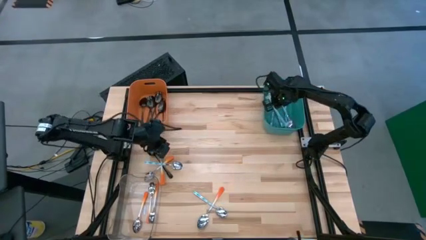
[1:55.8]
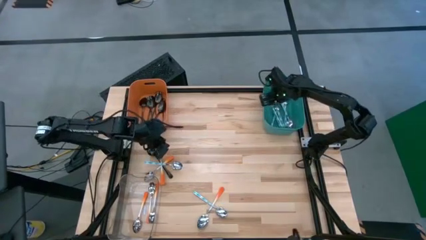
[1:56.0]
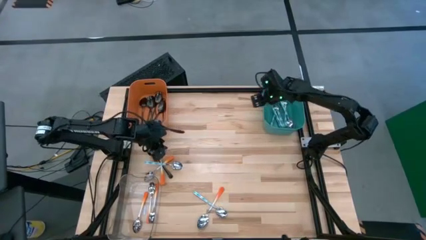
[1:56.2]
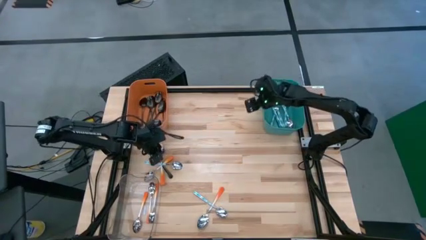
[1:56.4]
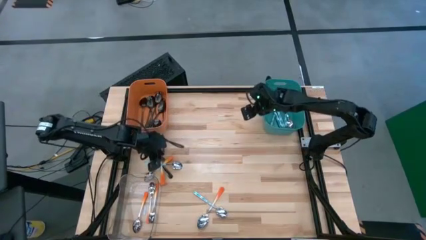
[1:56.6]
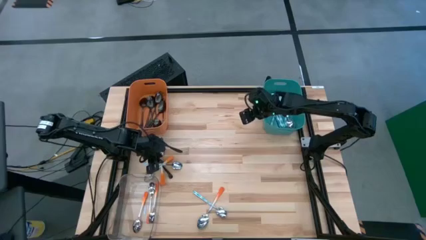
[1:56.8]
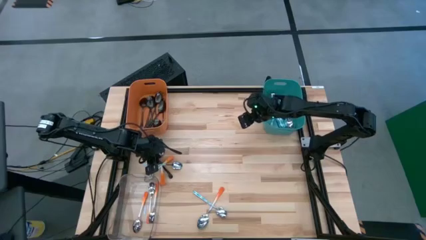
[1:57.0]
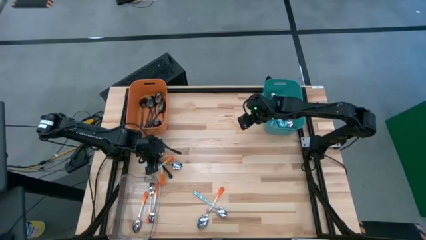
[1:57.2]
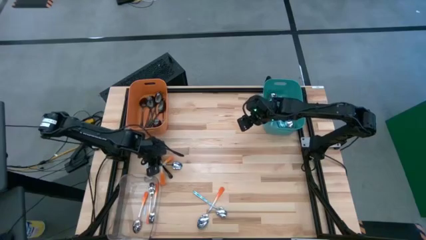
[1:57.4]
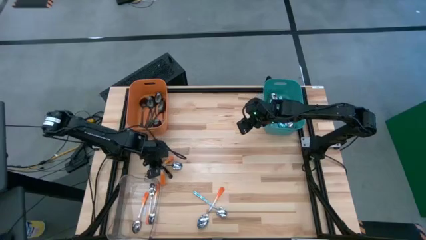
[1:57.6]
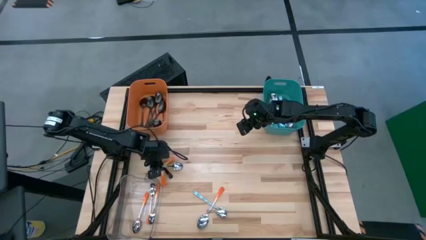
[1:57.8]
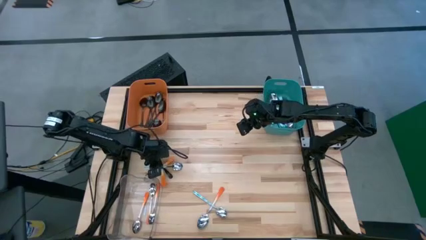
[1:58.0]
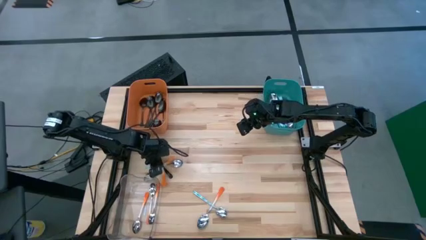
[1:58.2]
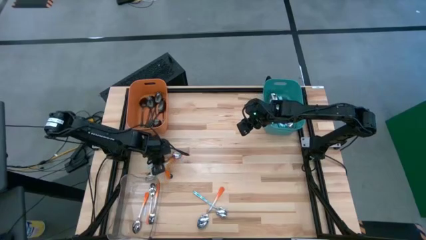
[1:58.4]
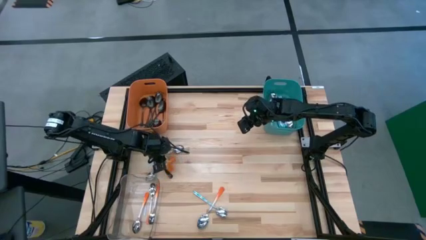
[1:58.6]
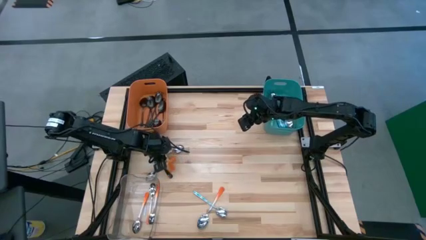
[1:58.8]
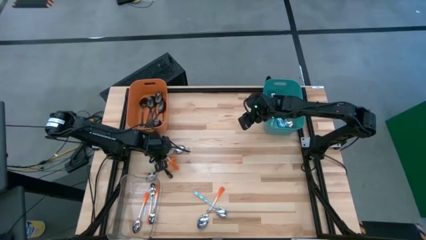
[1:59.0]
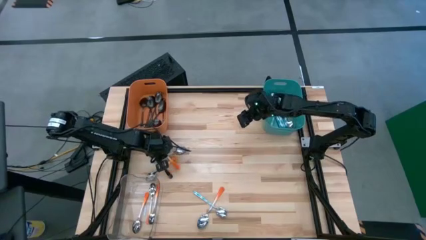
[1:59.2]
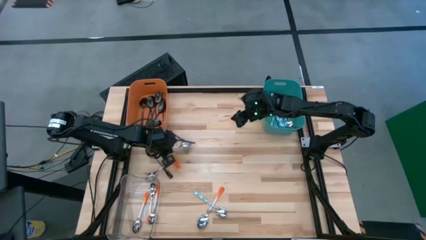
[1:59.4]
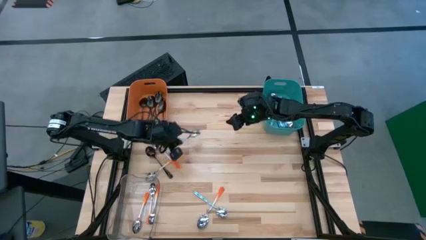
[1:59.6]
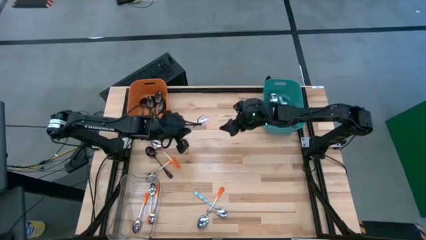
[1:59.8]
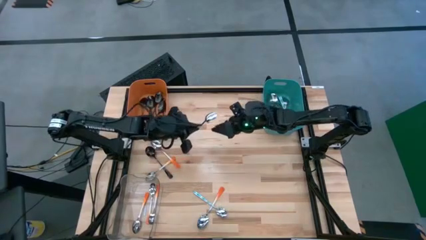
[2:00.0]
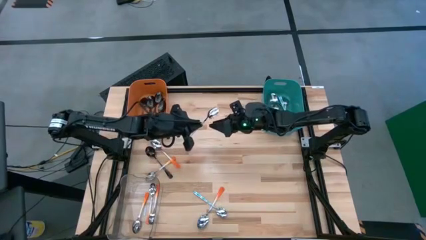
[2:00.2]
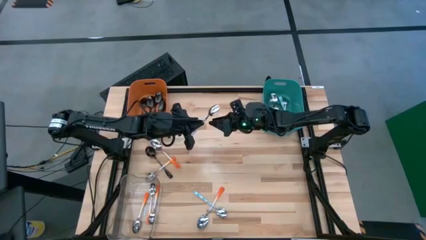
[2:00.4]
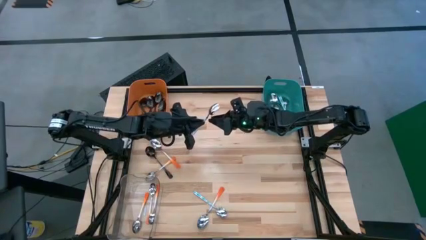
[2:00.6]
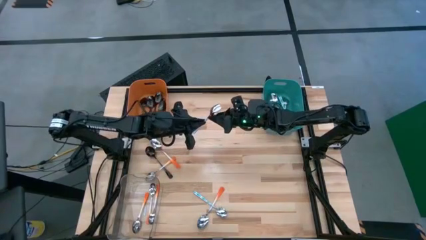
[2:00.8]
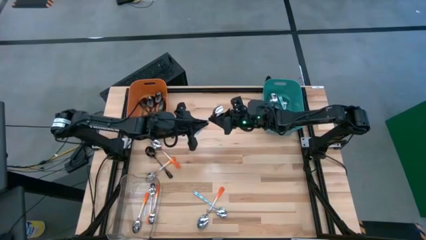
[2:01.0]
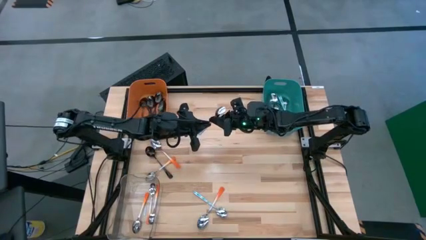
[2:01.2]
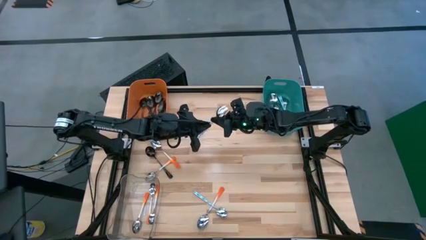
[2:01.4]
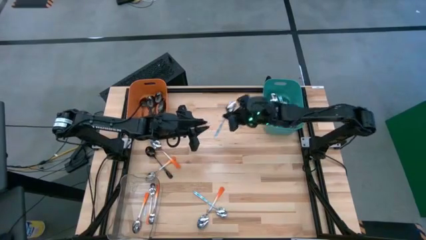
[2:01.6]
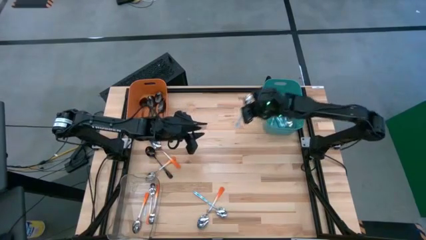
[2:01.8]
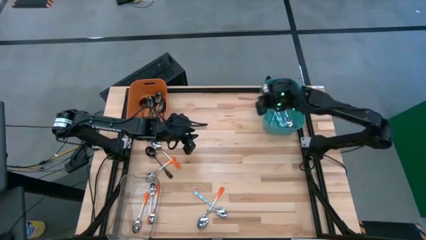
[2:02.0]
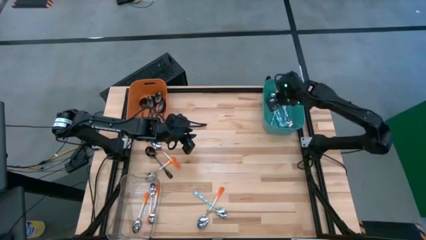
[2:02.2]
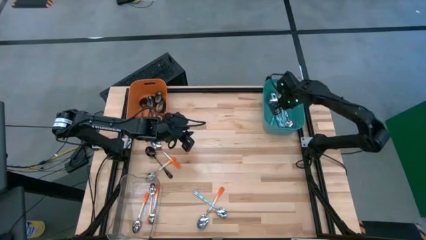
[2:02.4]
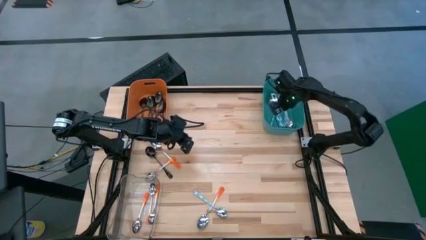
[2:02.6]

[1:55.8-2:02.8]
Task: Sort silverware by color (type)
Put the blue patterned spoon into the blue bin

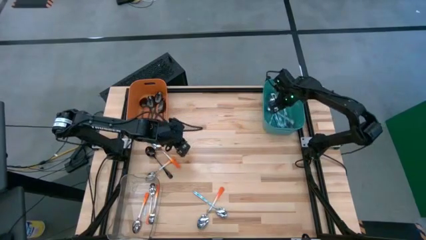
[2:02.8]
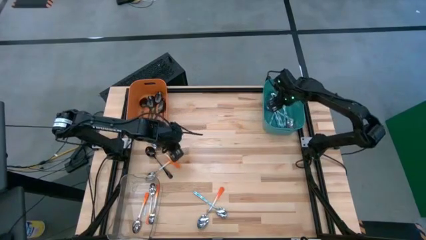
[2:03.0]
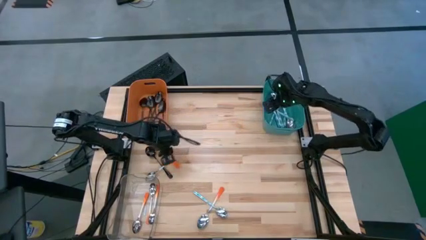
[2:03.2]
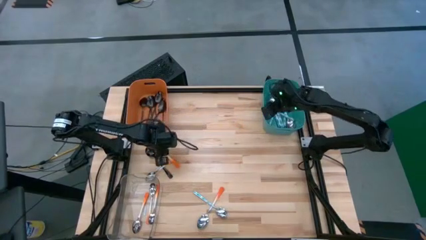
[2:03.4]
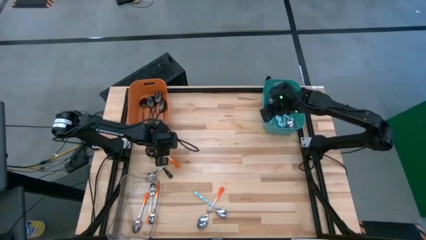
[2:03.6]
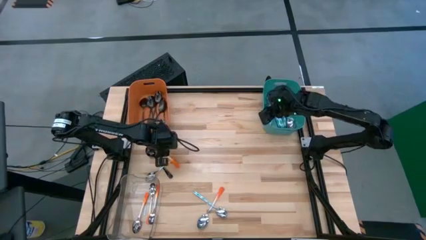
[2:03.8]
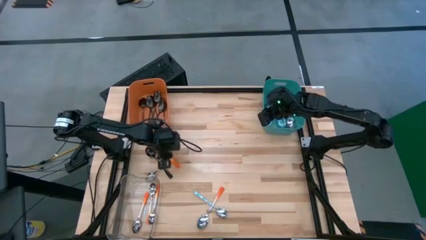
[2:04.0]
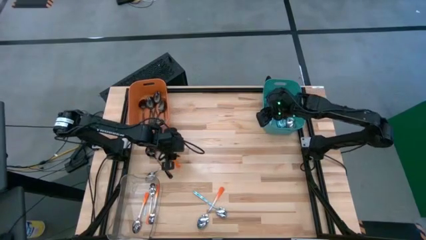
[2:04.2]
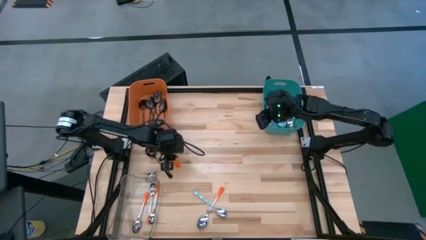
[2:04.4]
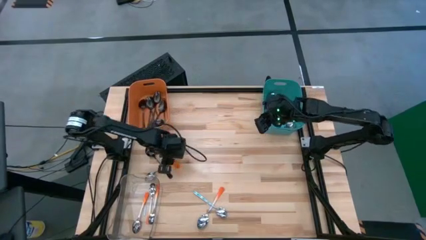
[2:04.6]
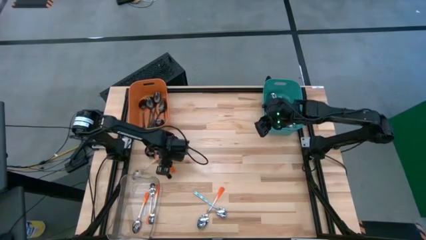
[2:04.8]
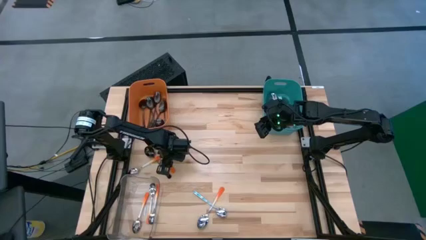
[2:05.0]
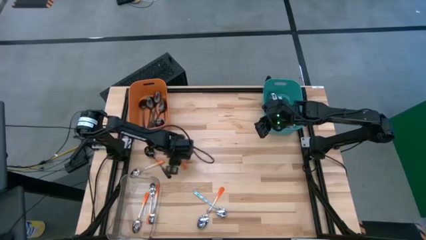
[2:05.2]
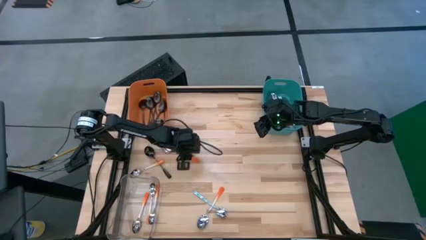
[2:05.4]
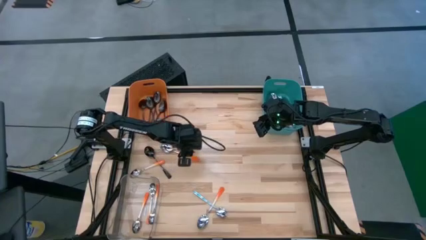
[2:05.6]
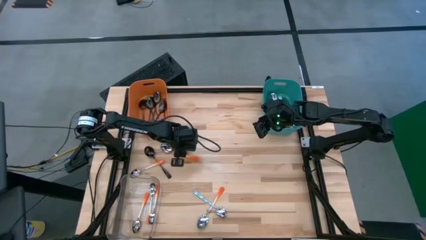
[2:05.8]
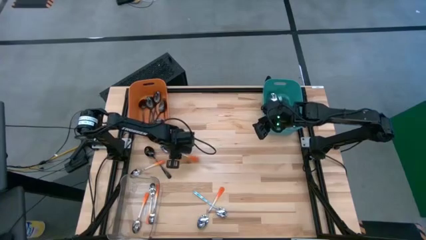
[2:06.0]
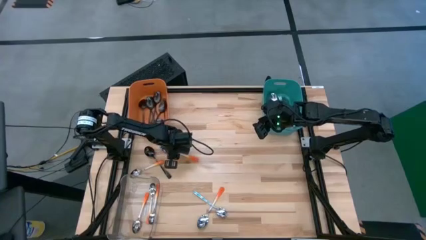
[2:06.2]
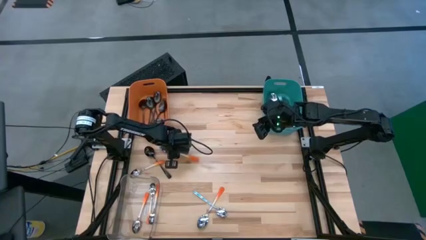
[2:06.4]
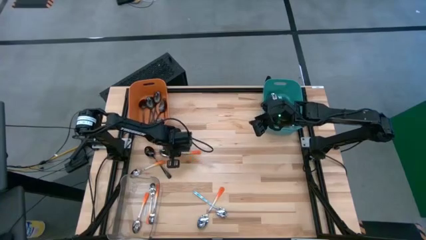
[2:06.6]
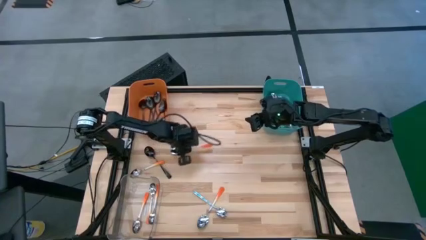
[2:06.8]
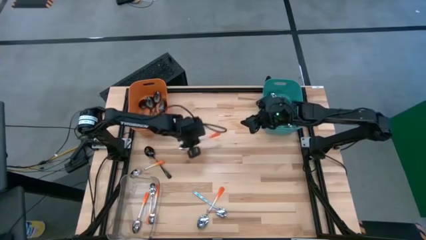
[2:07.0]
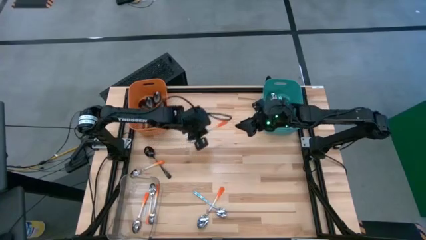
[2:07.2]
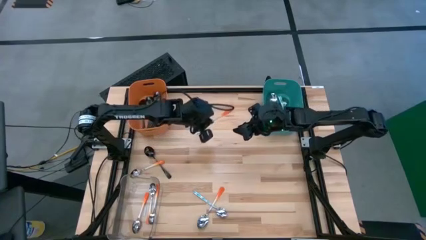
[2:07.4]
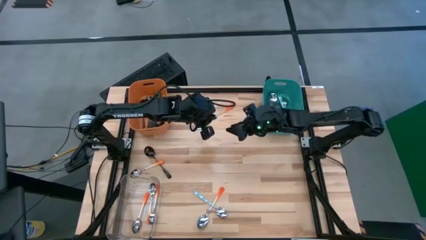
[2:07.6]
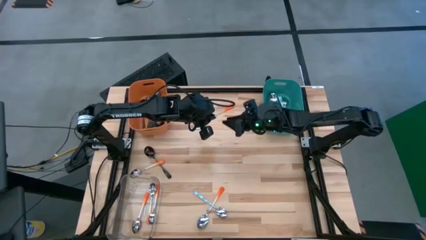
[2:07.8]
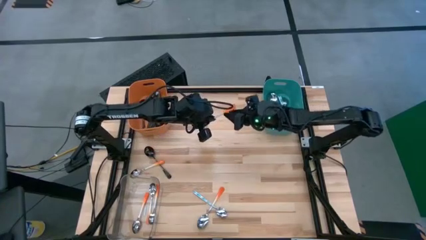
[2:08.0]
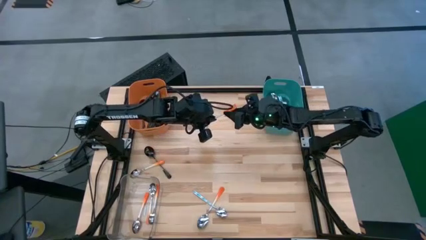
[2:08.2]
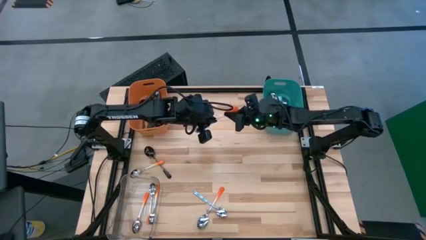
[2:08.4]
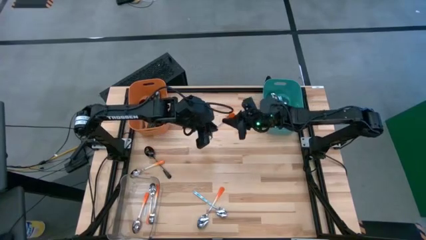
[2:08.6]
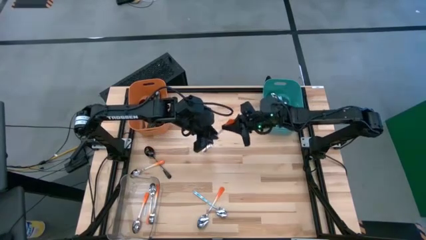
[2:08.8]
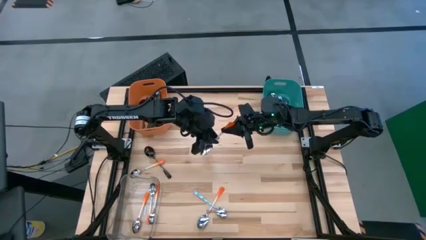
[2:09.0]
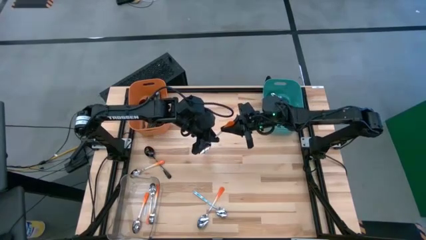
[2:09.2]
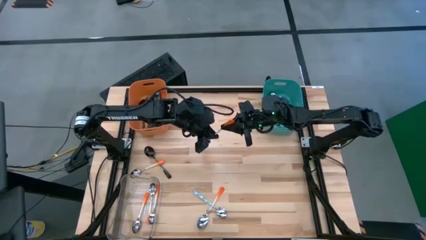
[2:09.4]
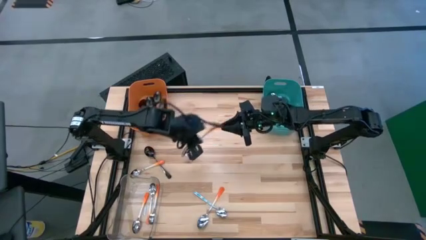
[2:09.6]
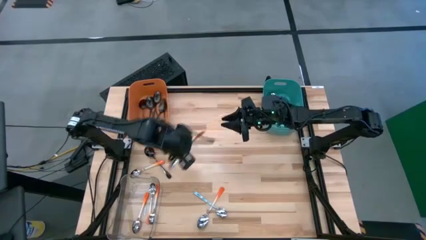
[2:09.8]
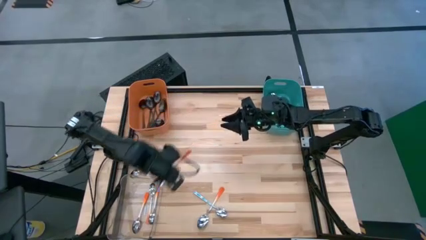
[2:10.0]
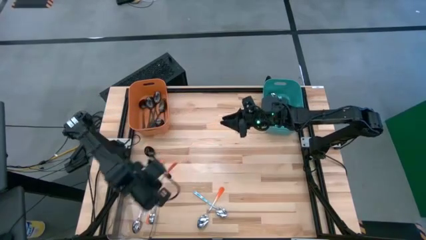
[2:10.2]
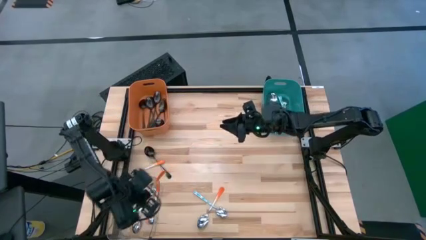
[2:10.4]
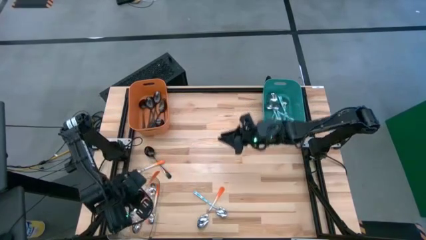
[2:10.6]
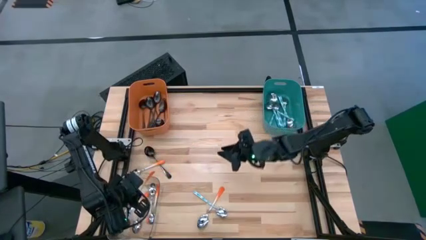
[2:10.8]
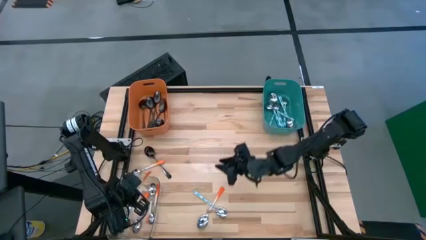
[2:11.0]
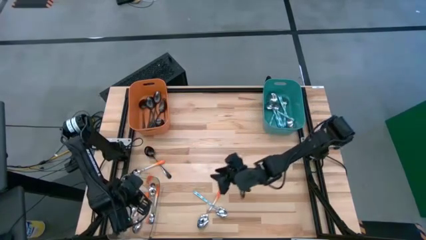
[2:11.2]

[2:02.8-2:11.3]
Put the orange spoon into the transparent bin

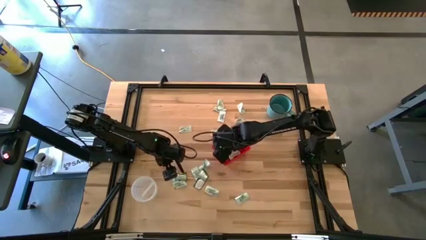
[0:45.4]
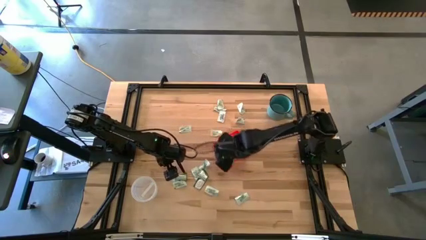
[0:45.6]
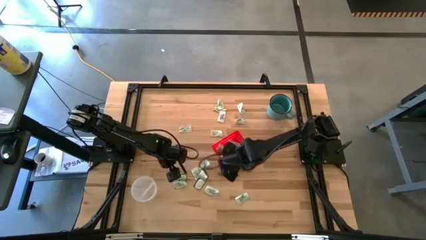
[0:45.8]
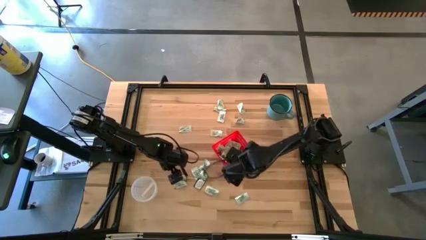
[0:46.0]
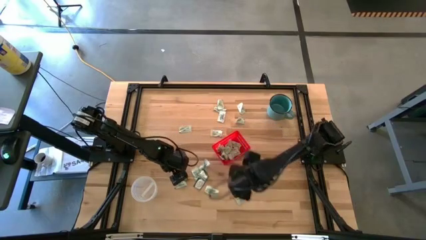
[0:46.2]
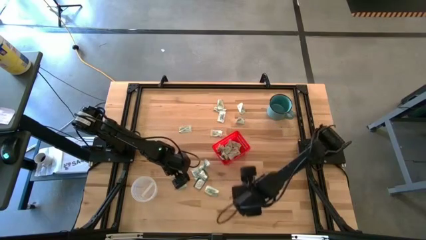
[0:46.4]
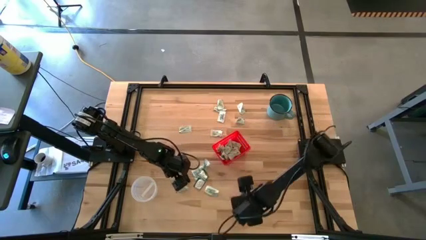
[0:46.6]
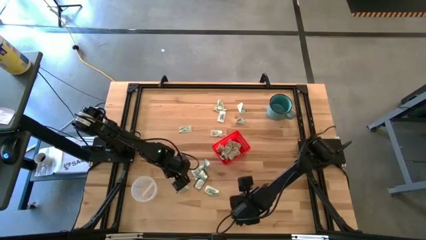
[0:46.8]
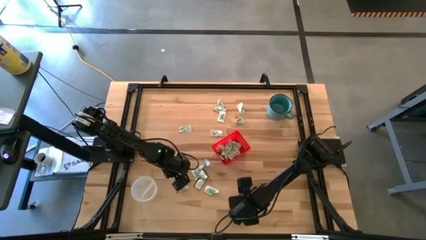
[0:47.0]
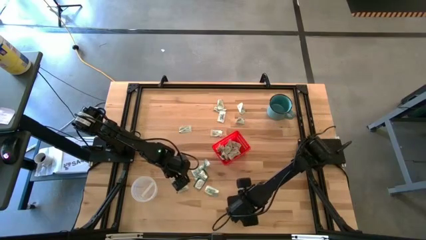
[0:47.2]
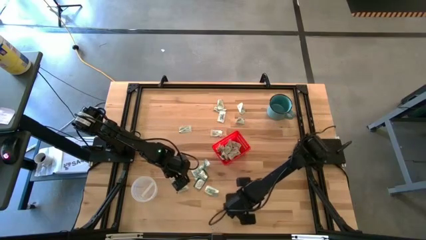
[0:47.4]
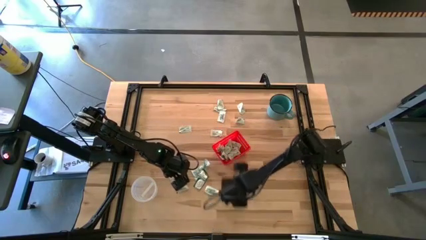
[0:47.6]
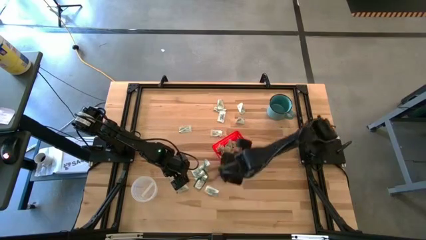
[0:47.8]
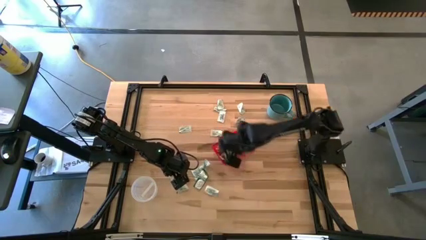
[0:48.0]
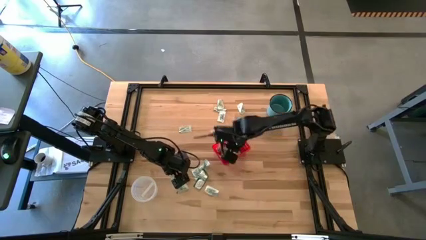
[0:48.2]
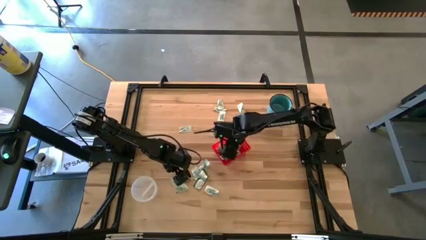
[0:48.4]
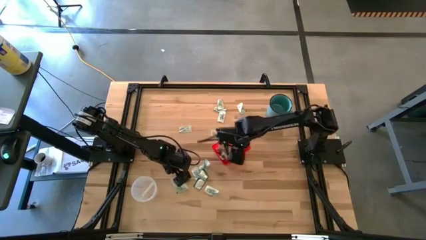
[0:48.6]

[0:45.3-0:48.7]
Task: Pick and place items into bin
Put the white stevia pack into the red bin
